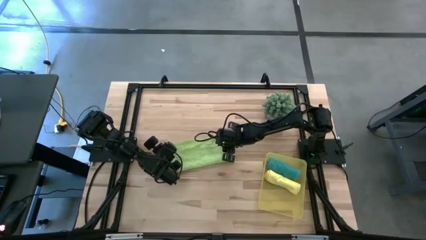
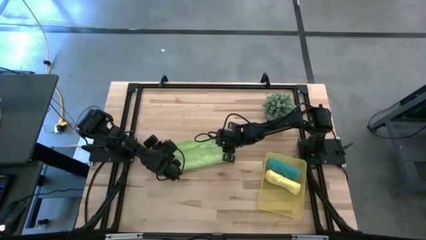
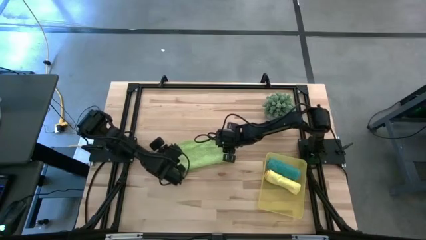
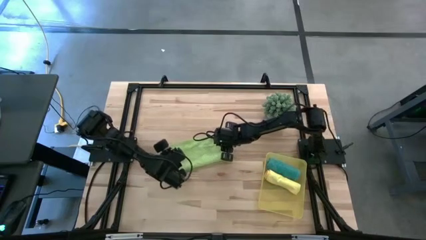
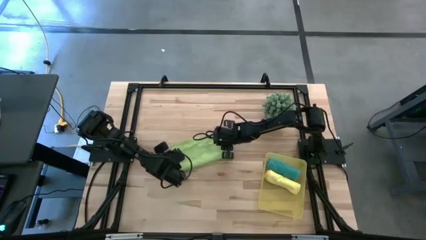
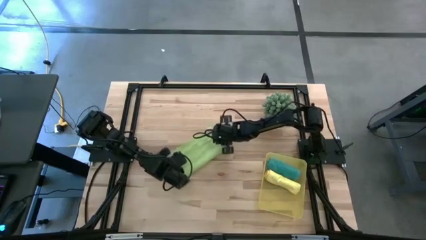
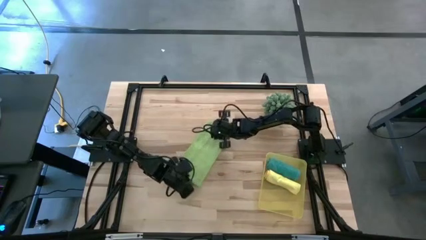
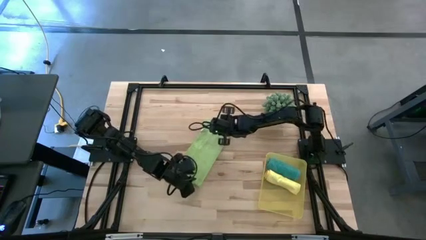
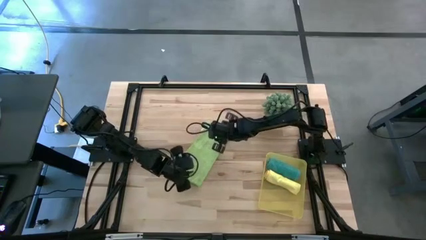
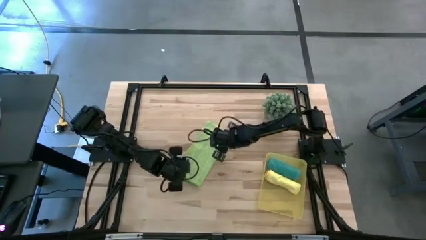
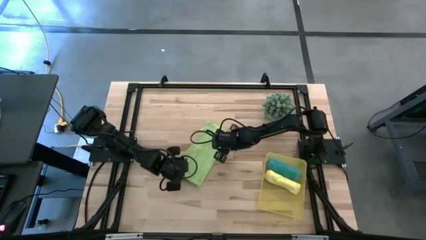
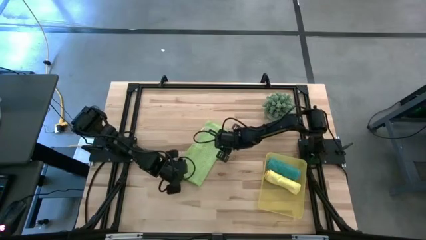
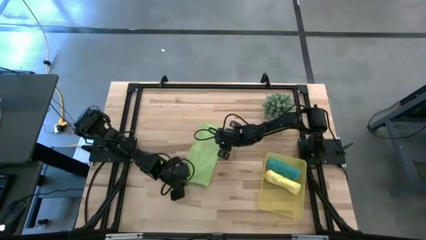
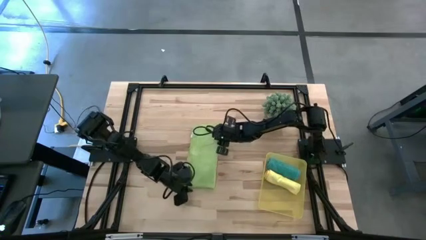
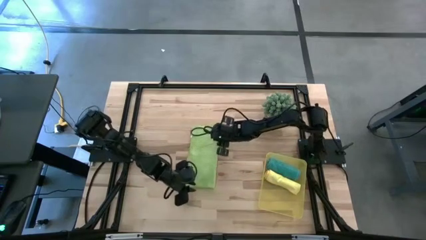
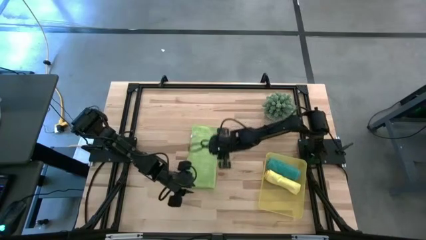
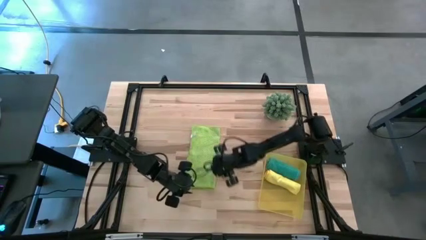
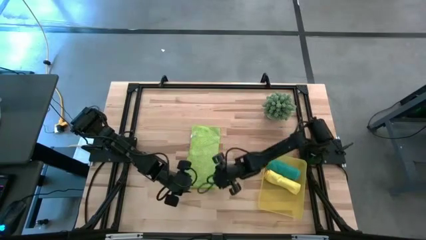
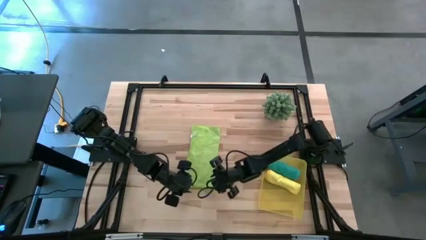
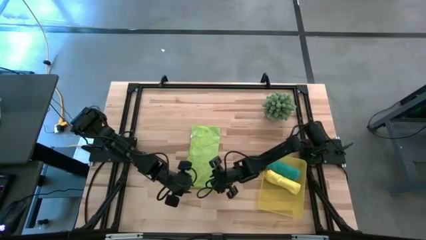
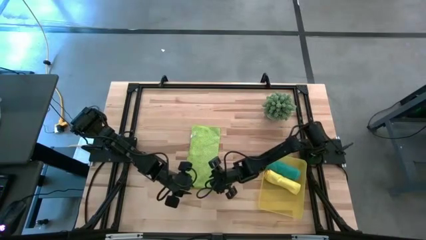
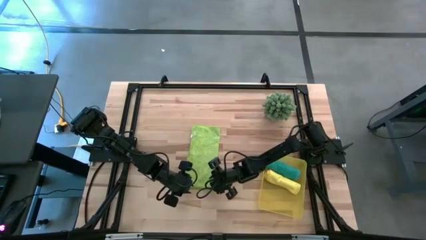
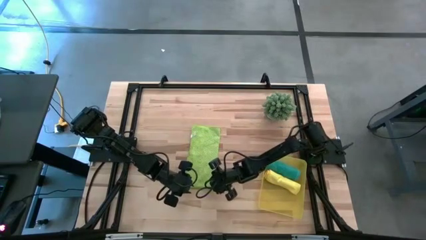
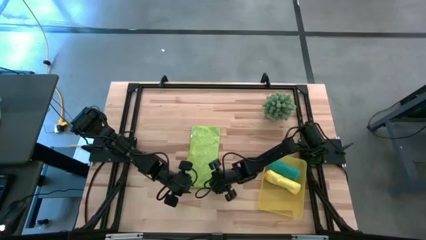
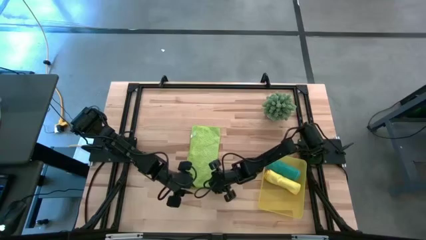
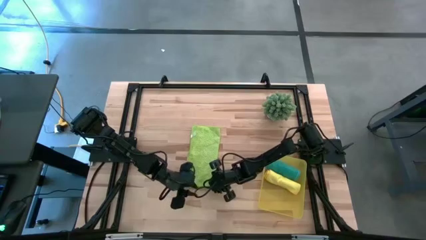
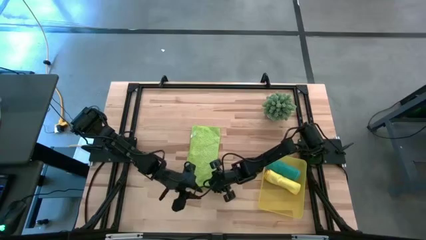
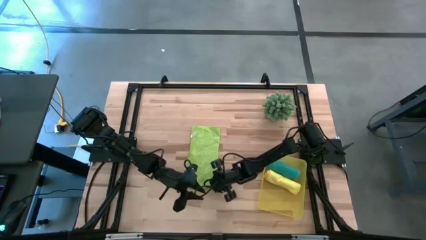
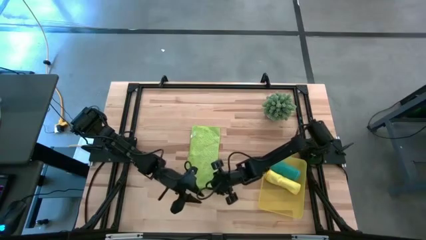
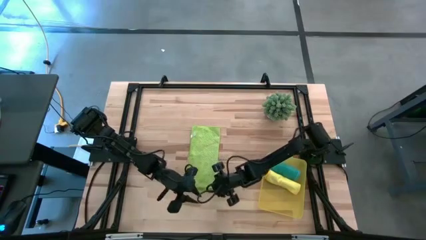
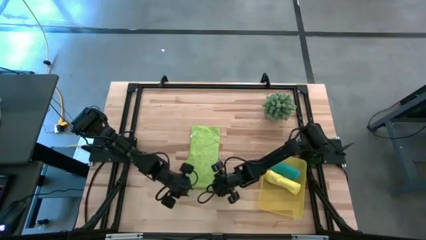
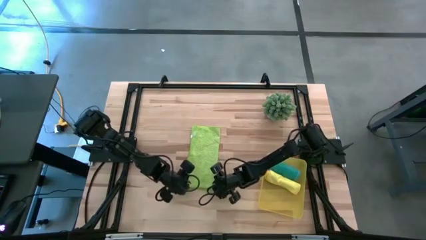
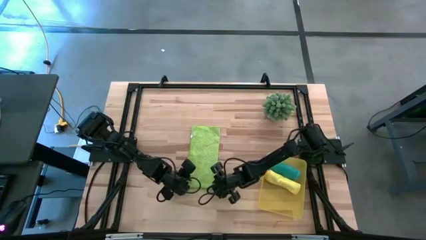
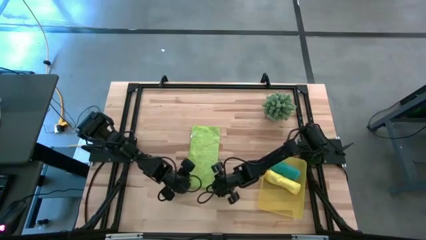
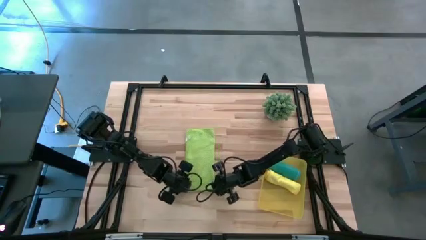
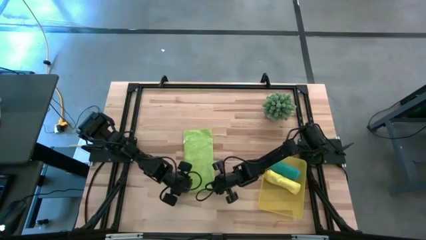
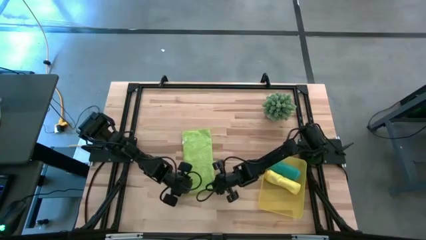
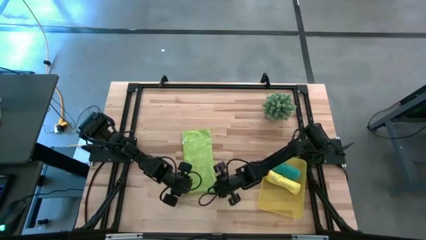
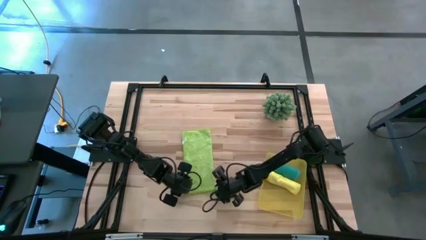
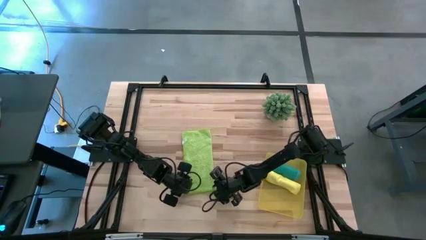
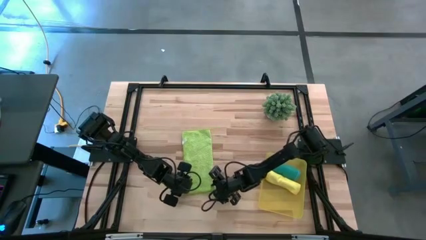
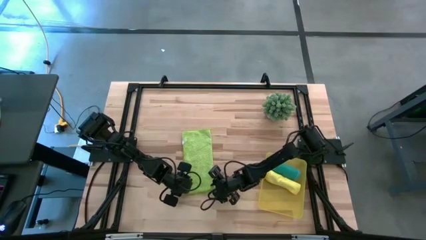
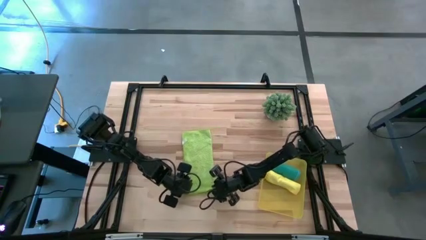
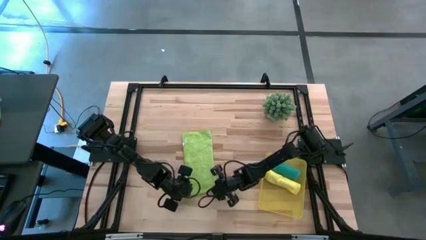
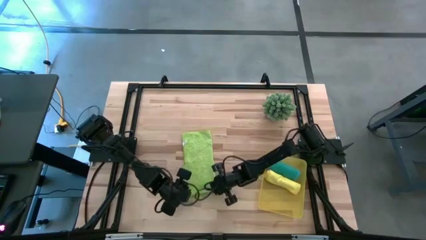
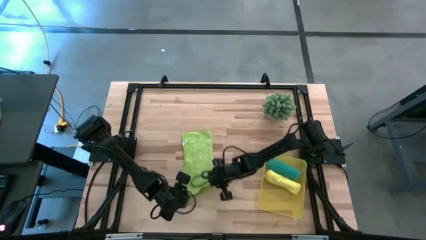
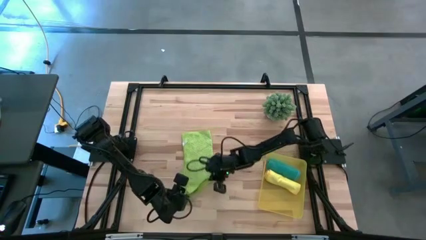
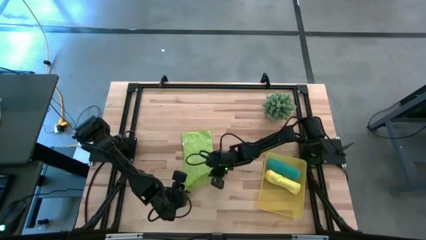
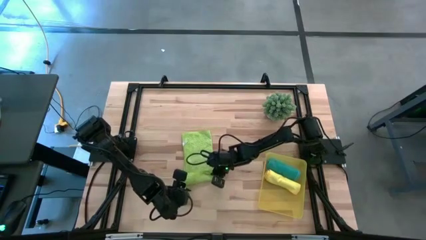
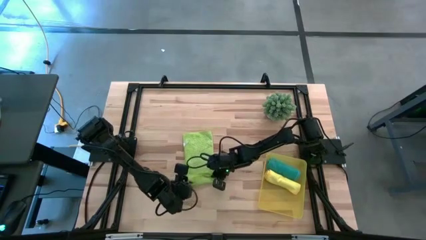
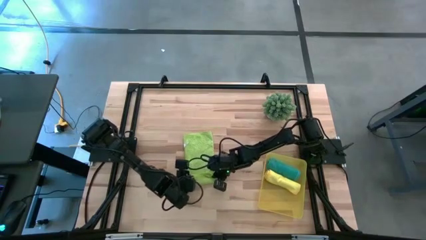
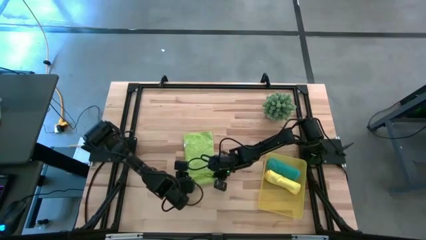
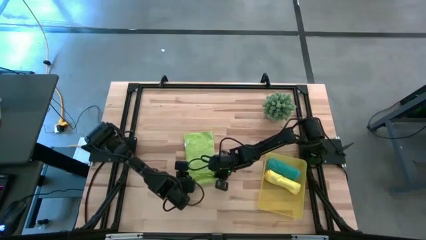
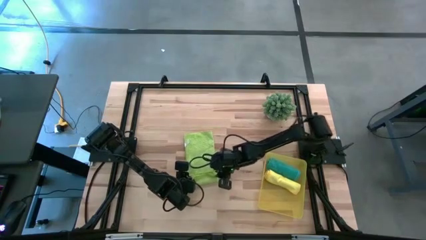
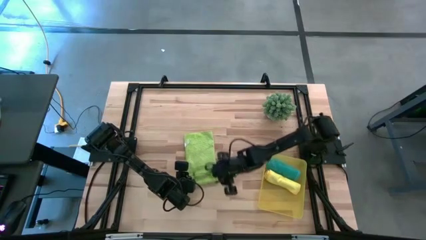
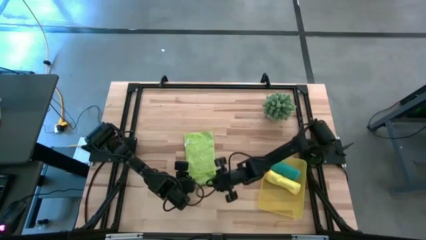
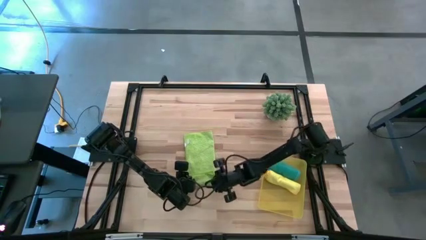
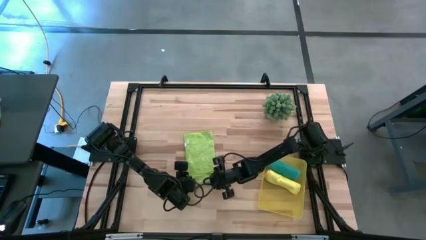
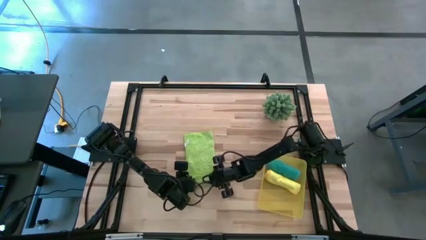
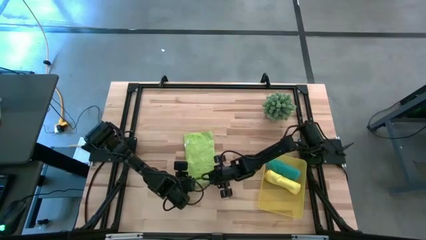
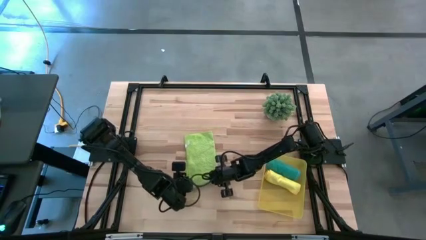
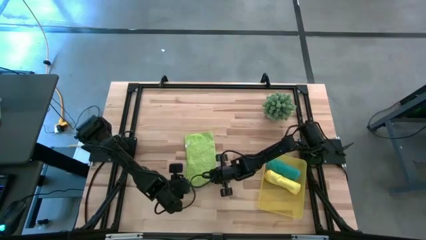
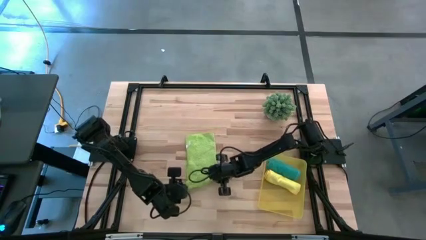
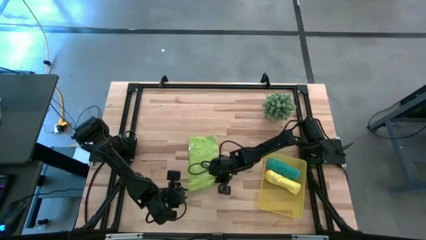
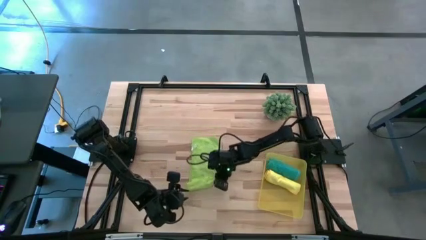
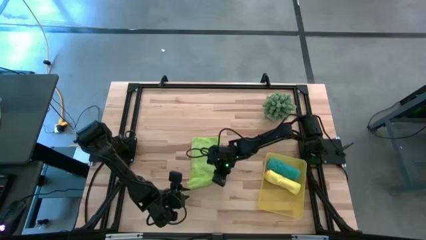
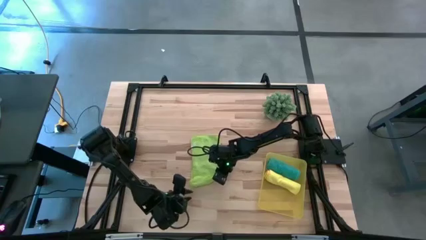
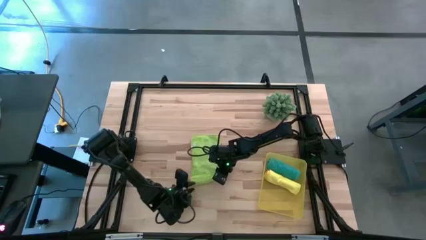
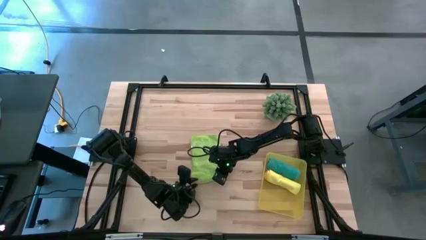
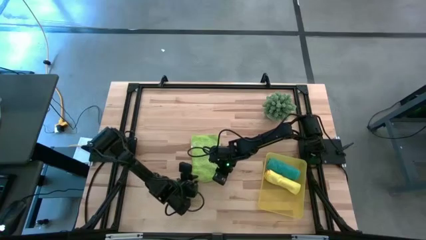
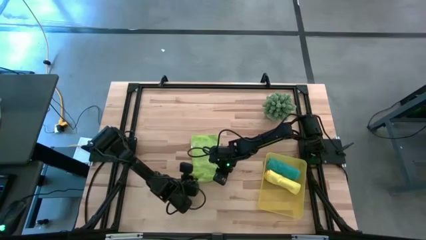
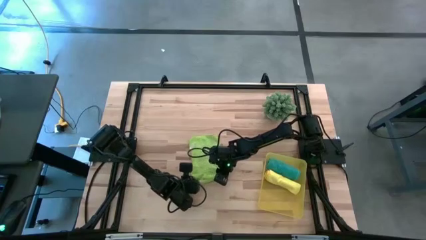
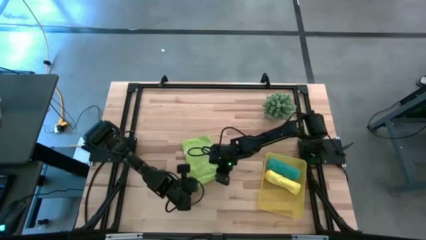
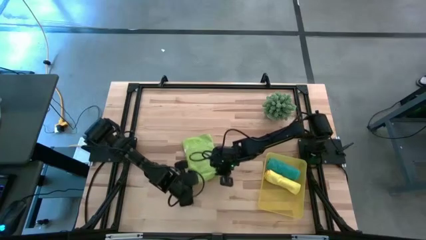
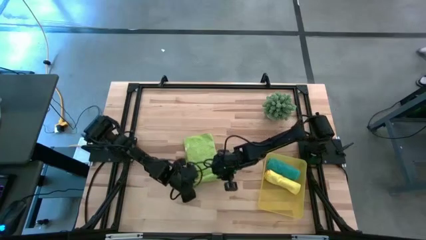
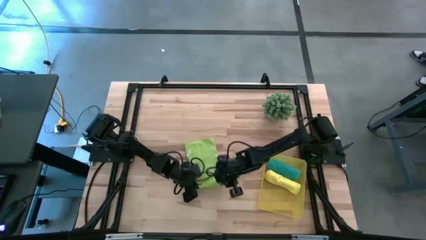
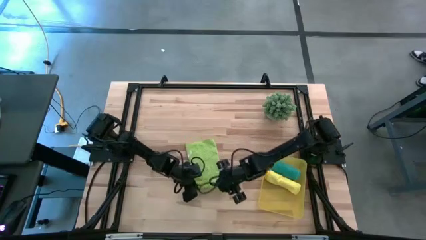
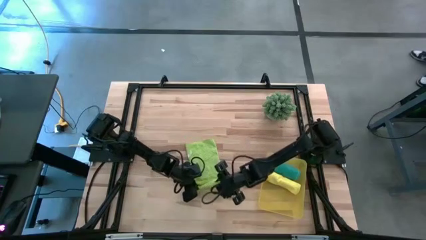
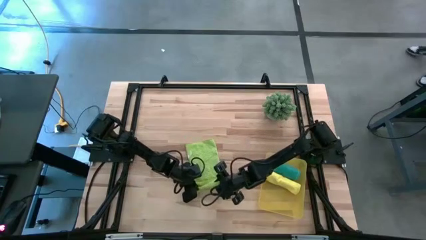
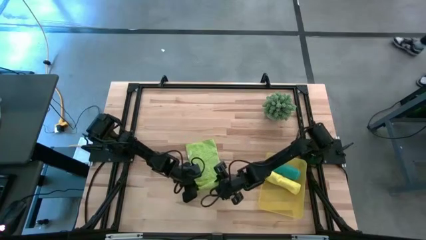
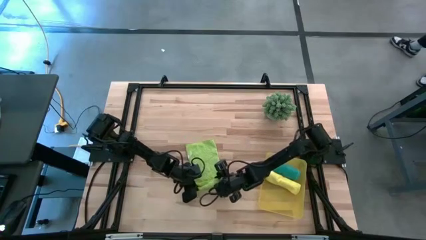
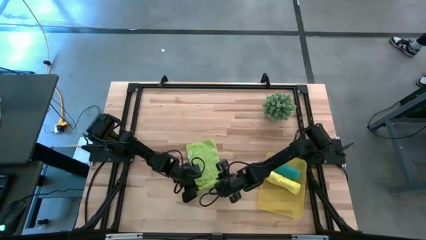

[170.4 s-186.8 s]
Task: Roll microfiber towels into tight, uniform cylinder then place into a basket
Roll the green microfiber cloth
